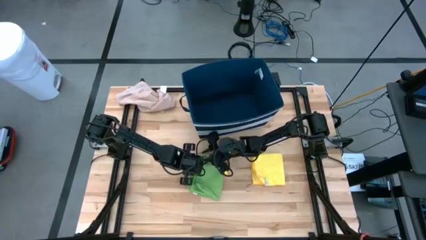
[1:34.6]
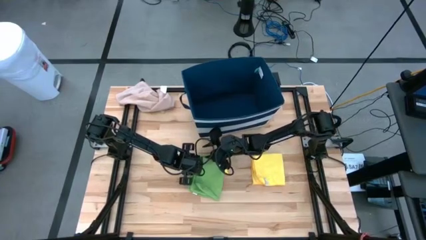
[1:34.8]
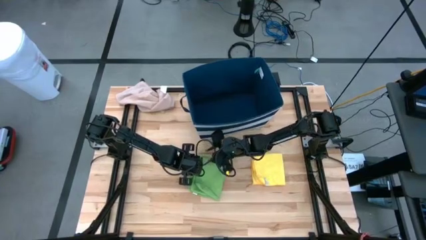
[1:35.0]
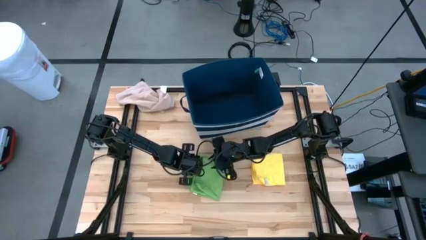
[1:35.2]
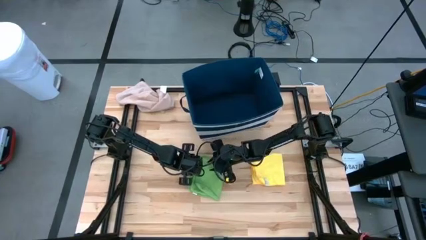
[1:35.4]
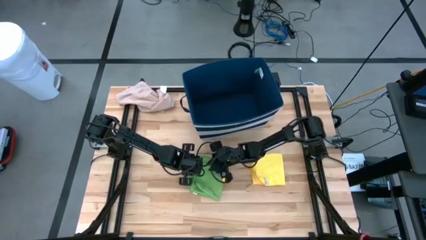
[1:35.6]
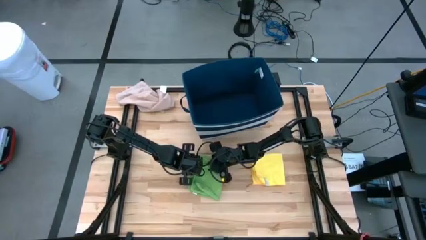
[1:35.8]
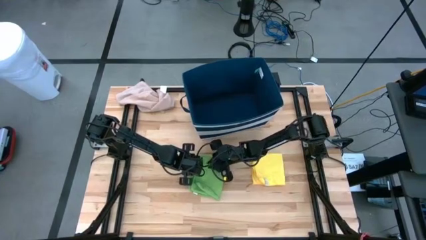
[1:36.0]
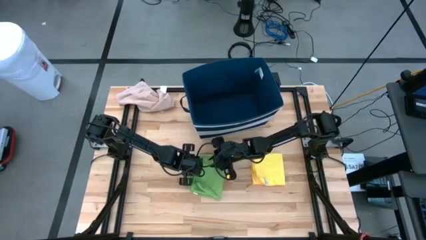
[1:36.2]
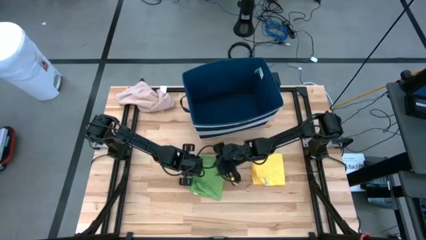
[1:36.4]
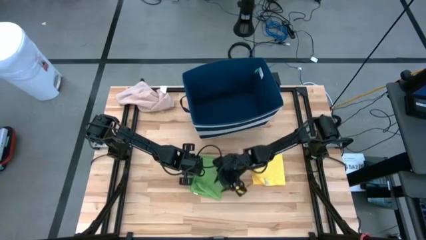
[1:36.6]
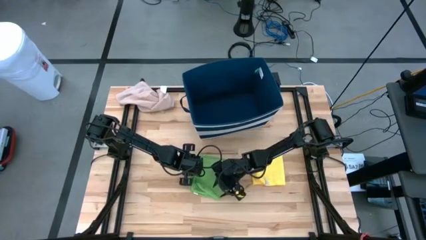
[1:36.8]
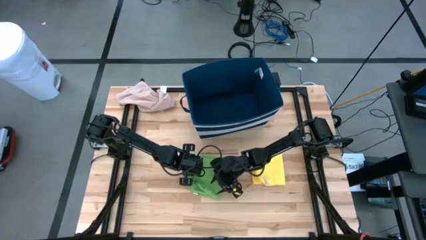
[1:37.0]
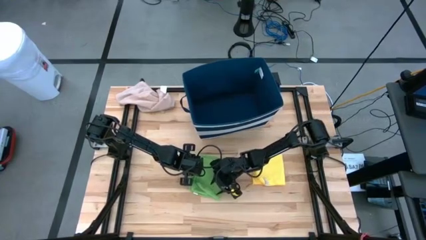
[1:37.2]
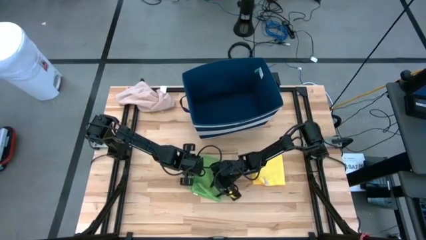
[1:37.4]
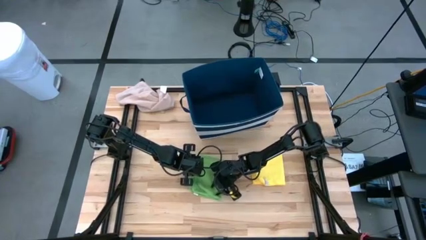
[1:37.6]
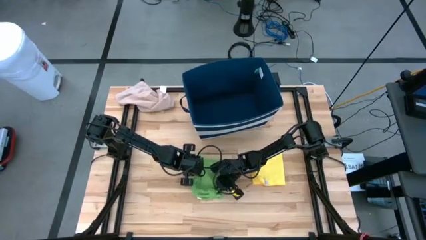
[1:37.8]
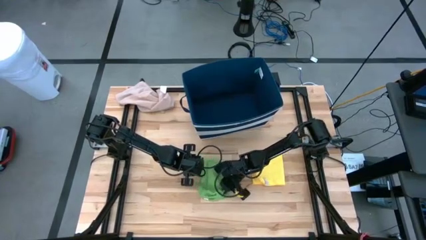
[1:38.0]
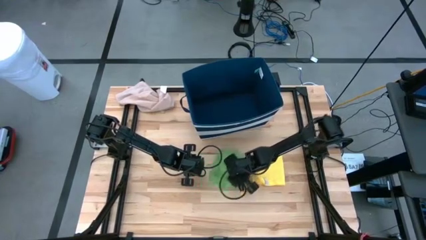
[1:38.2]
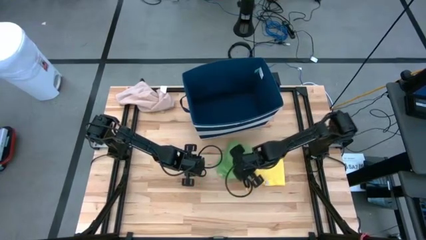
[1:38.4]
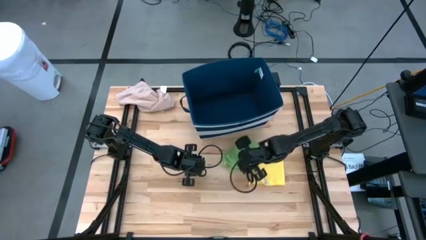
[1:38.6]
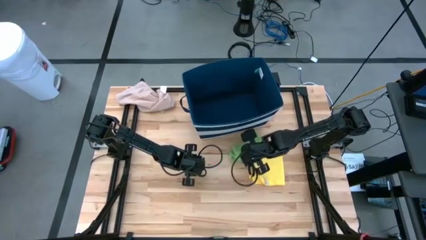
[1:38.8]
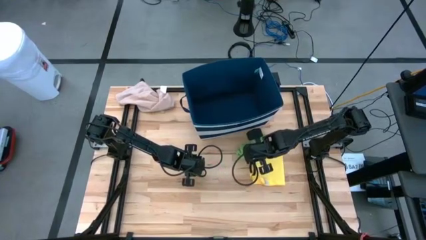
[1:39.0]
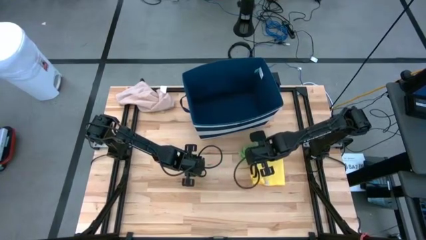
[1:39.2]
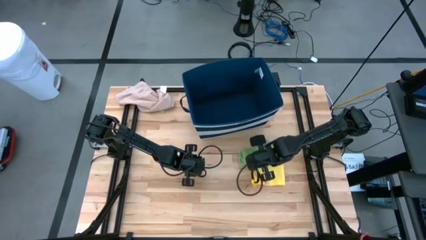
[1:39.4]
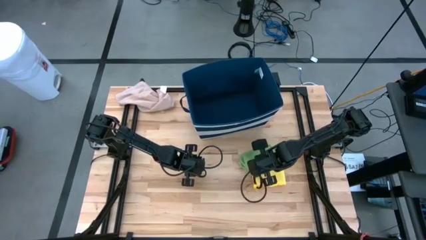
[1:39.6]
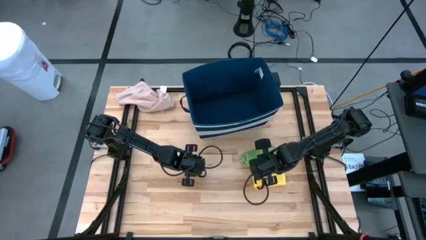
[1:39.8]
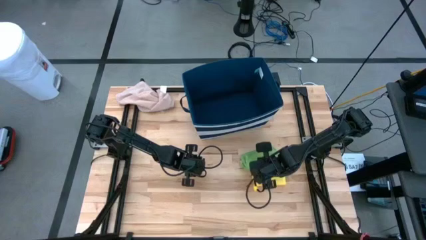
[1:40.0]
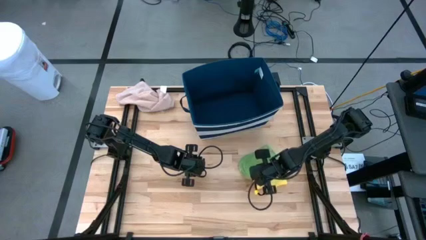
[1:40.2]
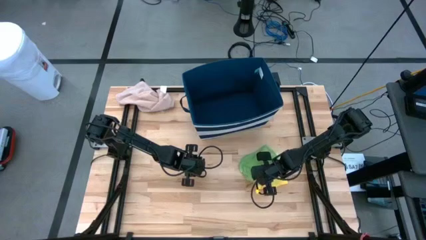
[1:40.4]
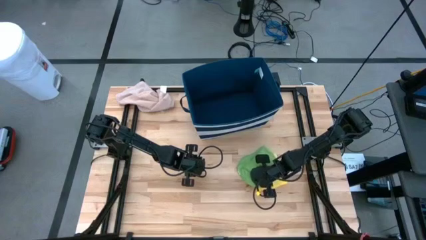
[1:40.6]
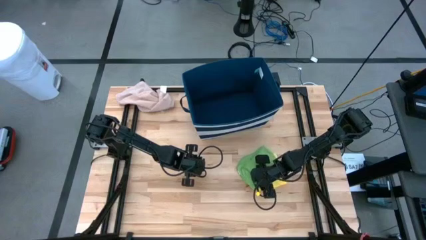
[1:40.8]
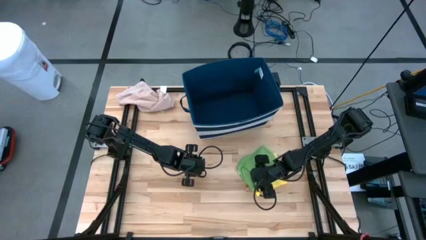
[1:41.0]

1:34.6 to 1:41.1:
Task: Fold towel
Stack the folded green towel on the yellow towel

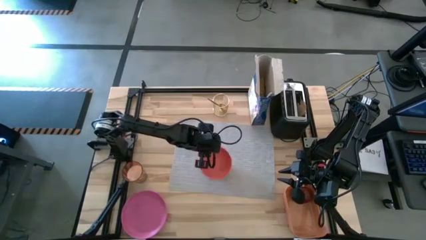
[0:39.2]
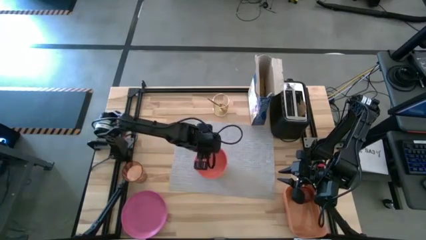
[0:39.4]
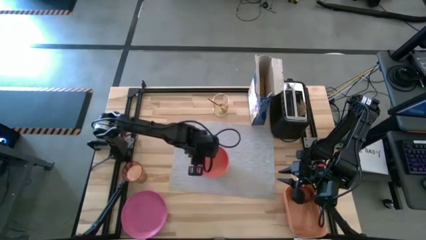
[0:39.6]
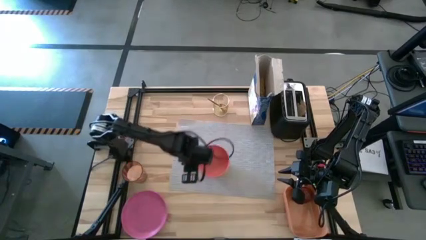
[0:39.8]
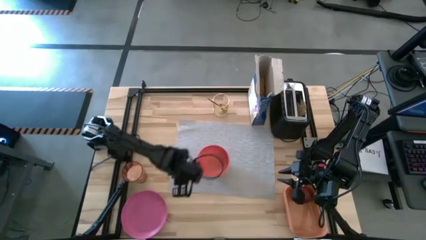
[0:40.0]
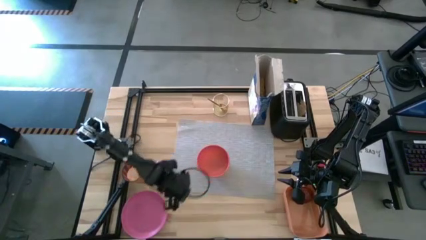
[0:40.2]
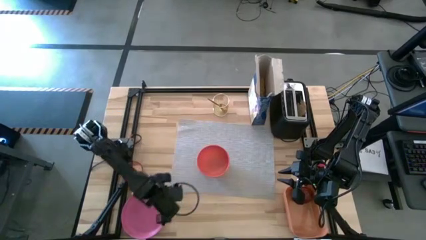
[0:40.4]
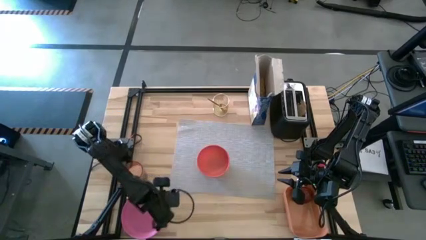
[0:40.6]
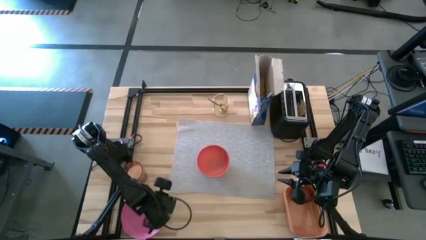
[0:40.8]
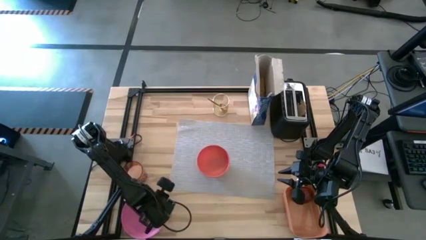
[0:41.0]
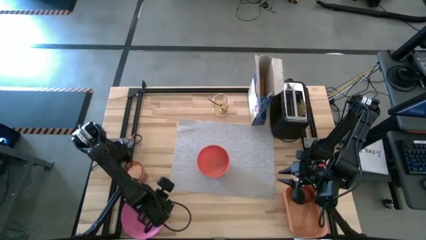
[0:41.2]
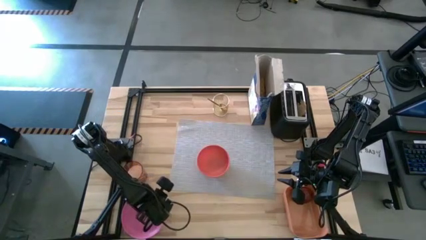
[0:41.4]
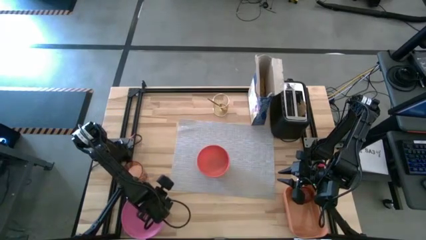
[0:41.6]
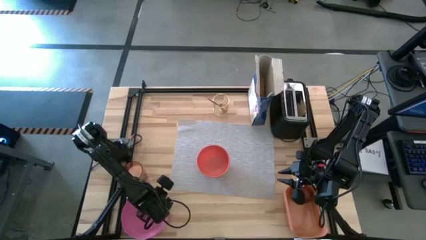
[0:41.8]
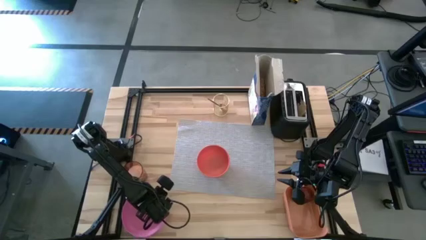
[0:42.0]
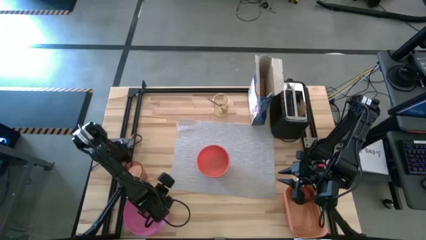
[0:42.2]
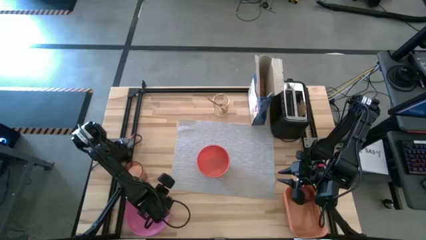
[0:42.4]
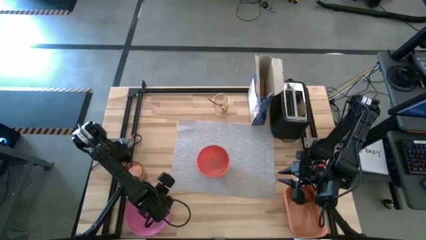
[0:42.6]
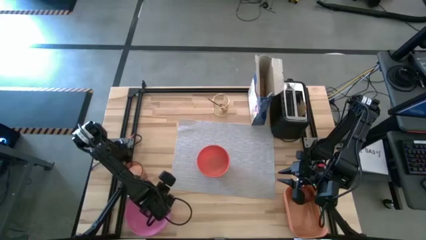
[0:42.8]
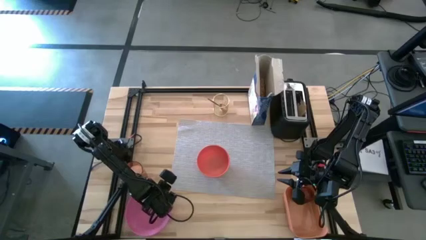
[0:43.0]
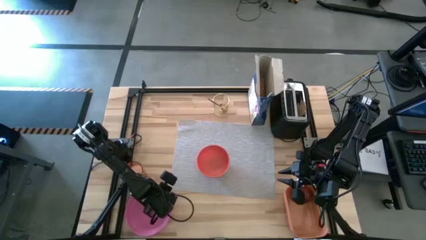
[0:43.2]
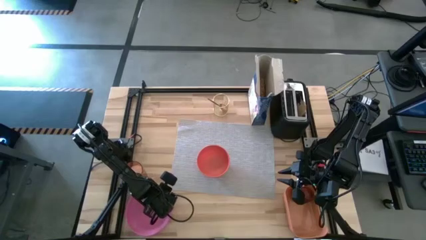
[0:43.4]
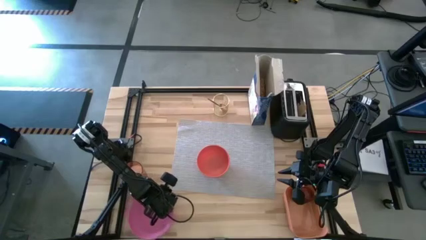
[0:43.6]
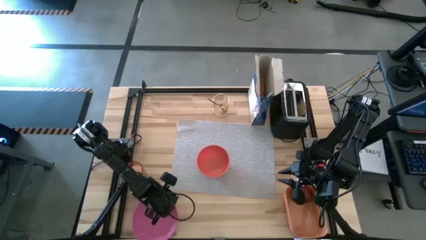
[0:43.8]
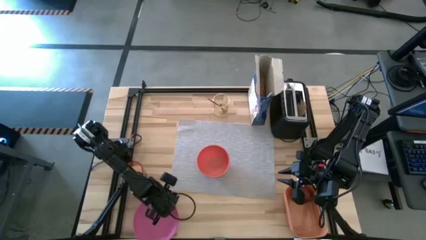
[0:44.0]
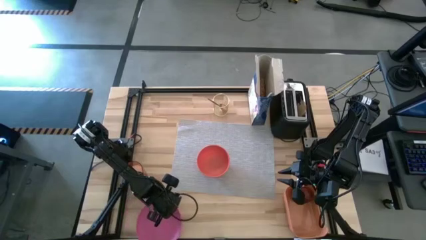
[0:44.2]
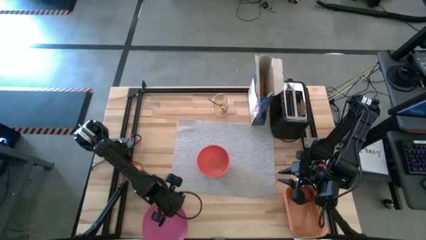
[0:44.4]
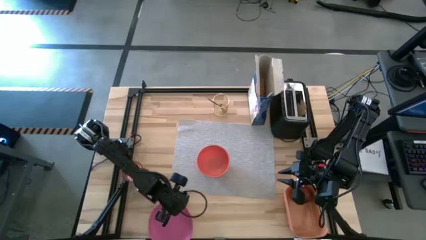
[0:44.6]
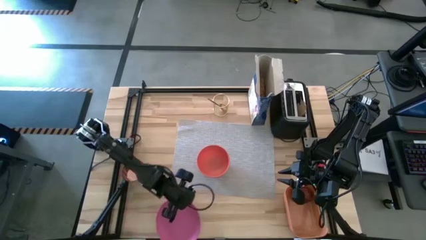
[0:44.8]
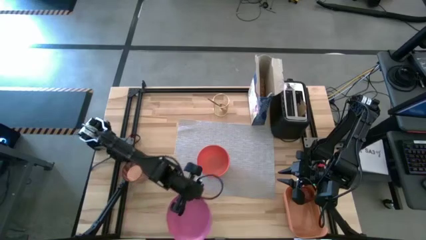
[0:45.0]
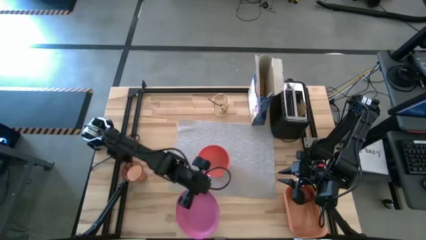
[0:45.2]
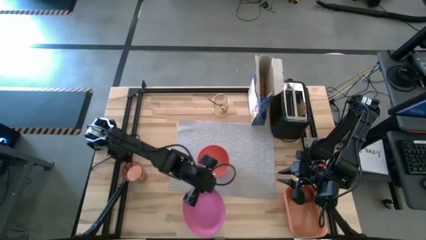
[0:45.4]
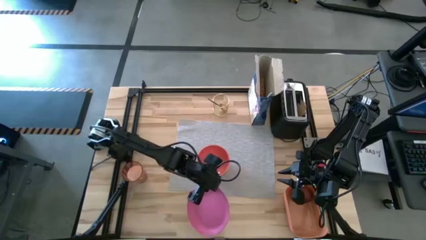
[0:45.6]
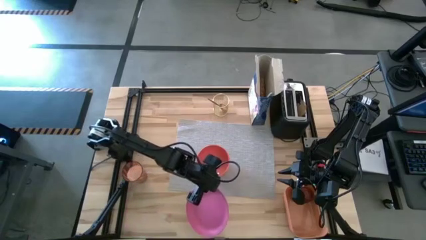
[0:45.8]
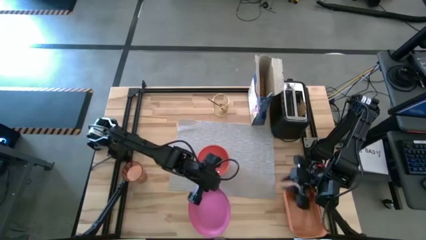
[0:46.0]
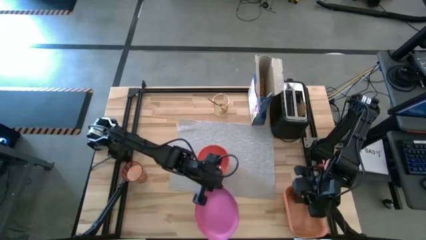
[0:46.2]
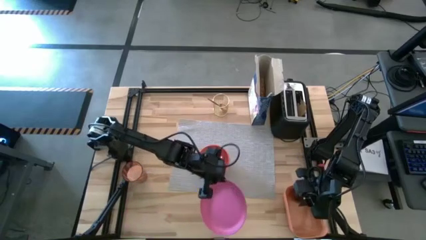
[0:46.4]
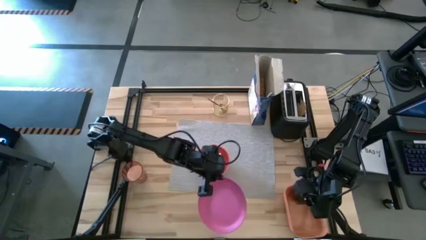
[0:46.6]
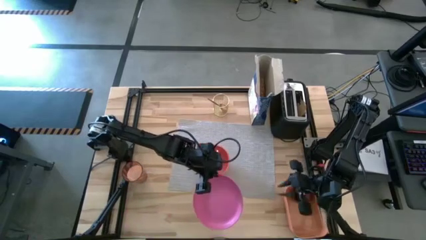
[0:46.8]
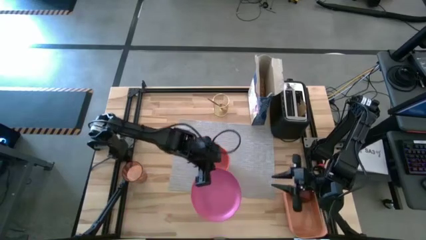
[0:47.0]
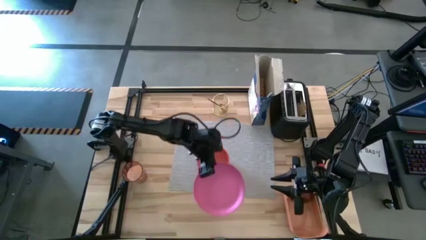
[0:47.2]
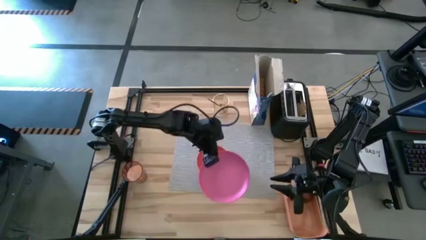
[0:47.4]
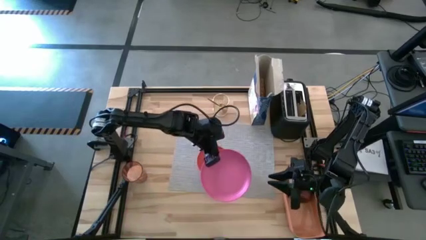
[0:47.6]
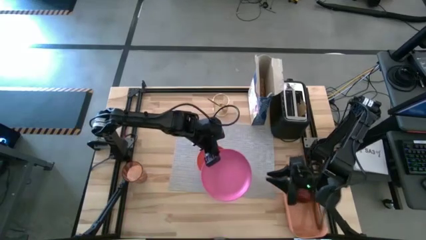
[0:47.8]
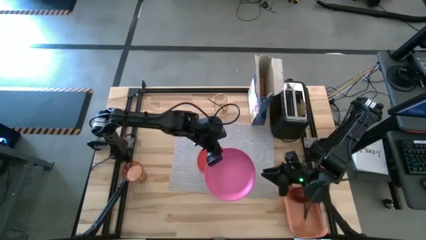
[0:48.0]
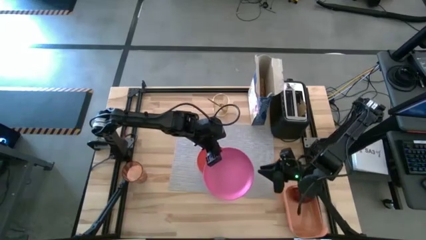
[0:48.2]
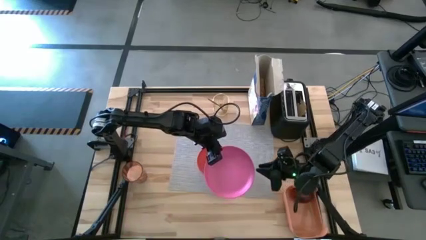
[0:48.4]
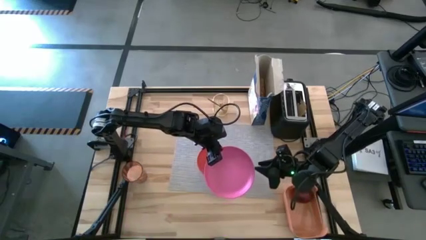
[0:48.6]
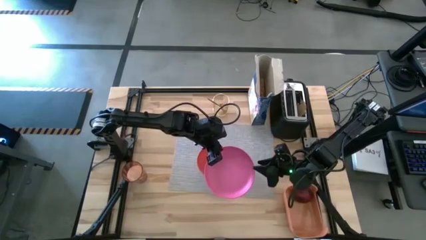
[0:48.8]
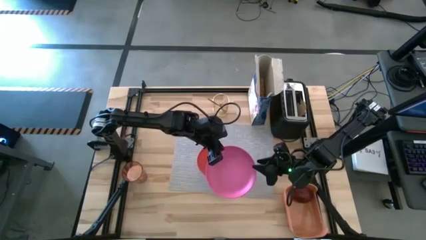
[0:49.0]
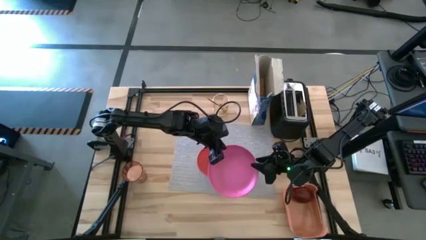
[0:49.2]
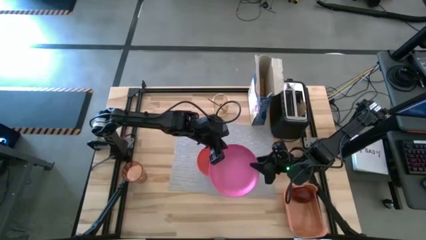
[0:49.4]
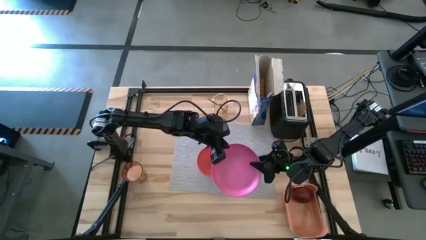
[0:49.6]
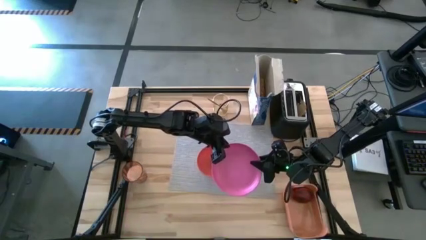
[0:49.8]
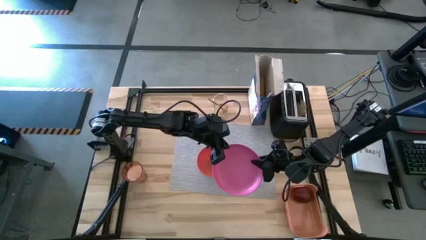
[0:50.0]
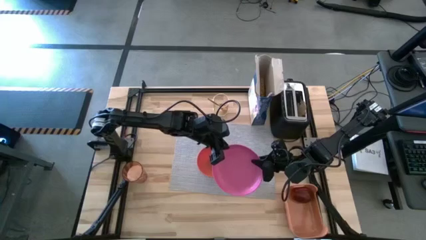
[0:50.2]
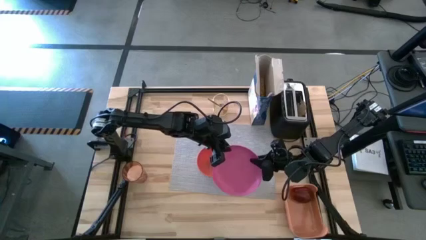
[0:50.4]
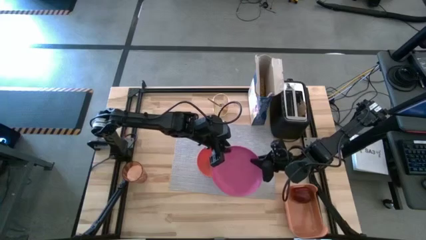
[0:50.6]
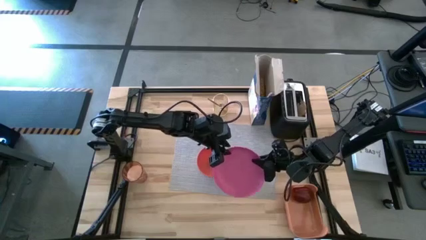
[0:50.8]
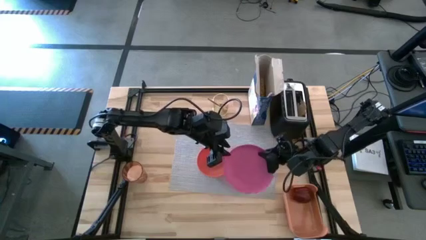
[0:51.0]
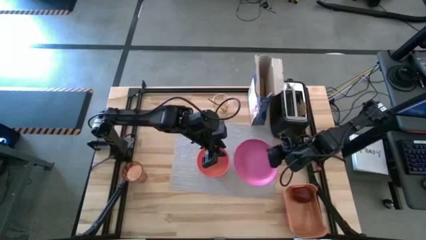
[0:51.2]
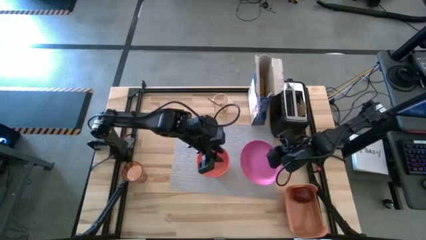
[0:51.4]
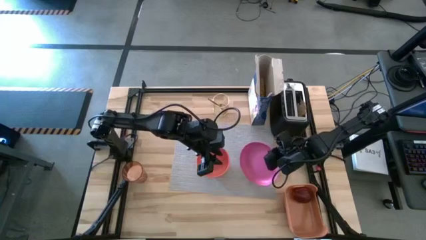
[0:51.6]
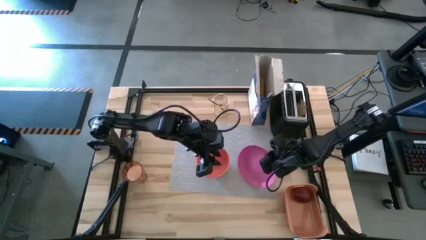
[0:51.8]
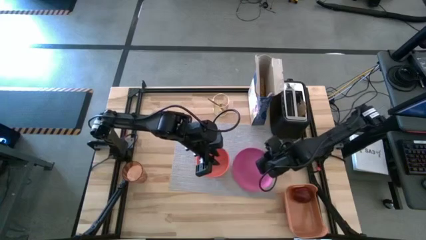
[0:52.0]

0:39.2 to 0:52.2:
Task: Arrange a breakfast setting
Put the pink plate to the right of the orange bowl on the gray table mat
